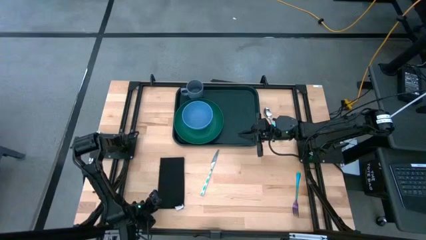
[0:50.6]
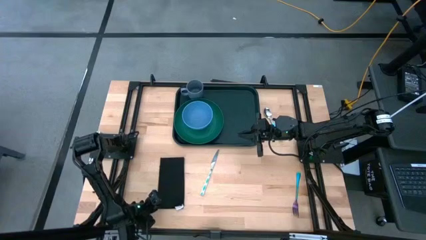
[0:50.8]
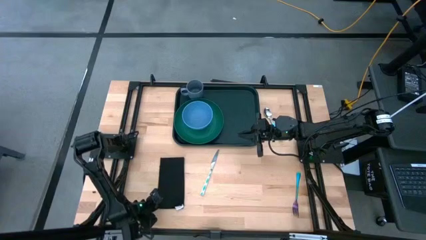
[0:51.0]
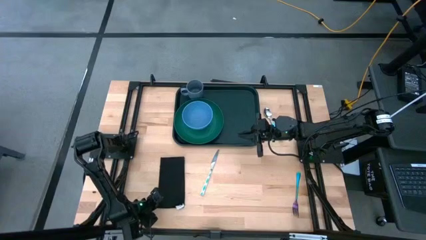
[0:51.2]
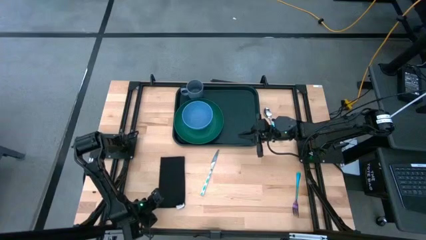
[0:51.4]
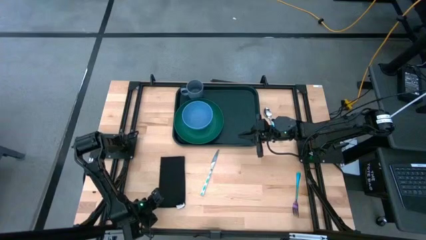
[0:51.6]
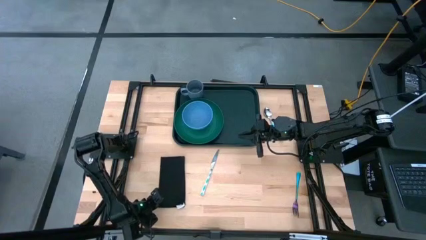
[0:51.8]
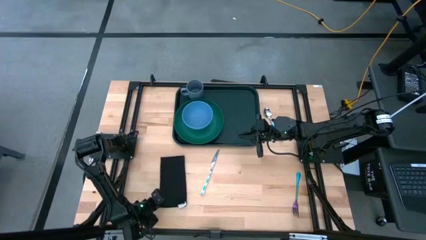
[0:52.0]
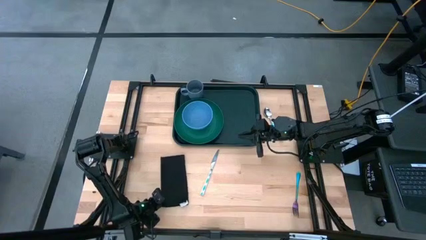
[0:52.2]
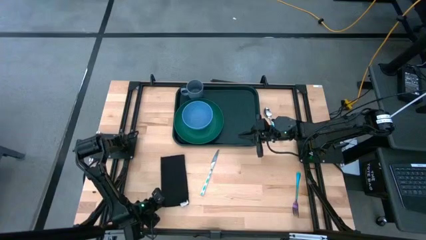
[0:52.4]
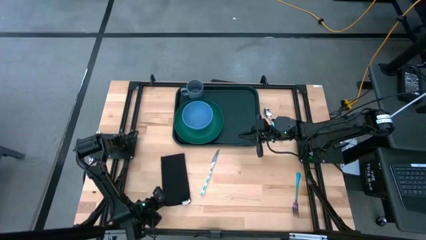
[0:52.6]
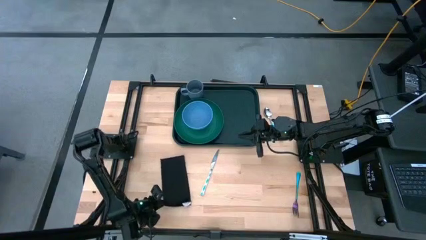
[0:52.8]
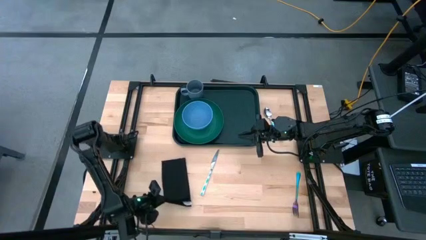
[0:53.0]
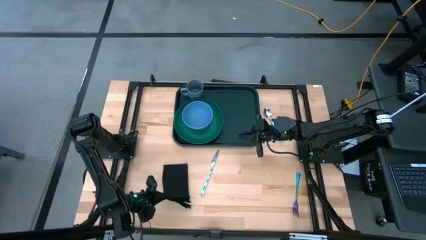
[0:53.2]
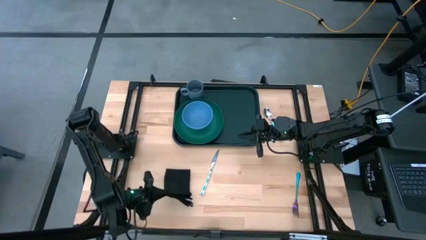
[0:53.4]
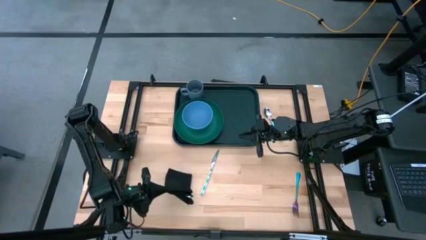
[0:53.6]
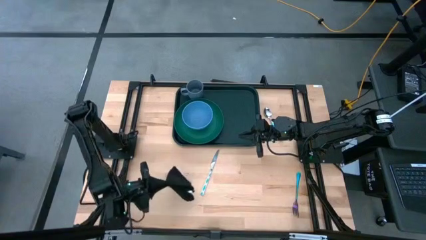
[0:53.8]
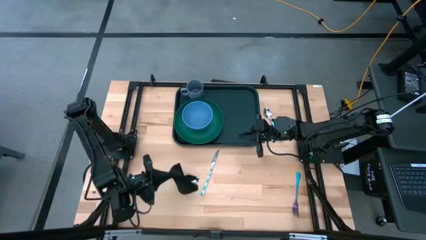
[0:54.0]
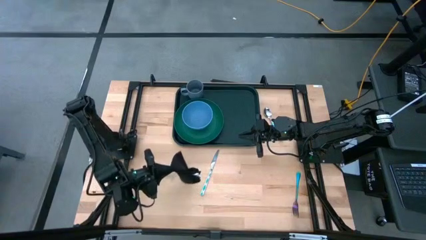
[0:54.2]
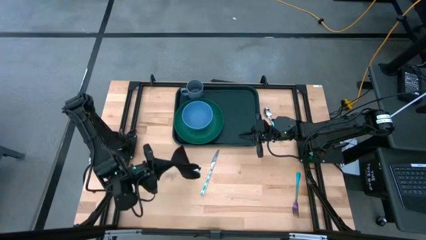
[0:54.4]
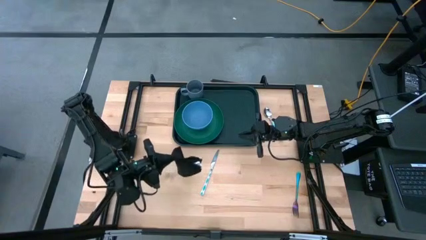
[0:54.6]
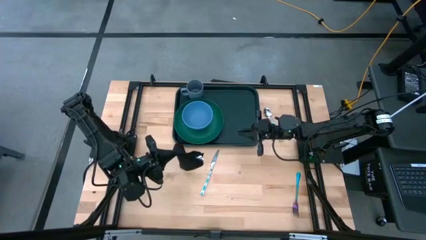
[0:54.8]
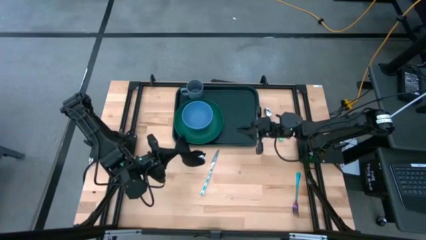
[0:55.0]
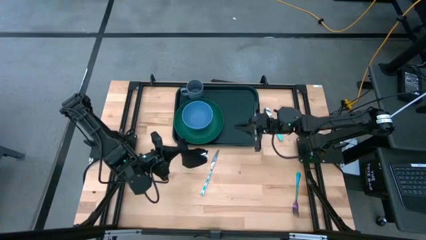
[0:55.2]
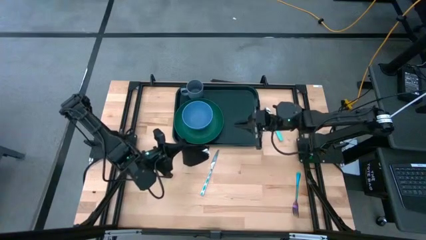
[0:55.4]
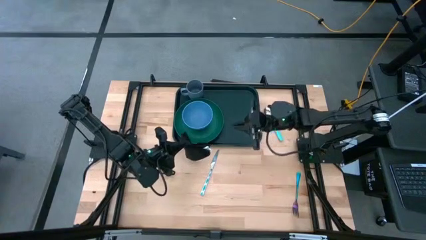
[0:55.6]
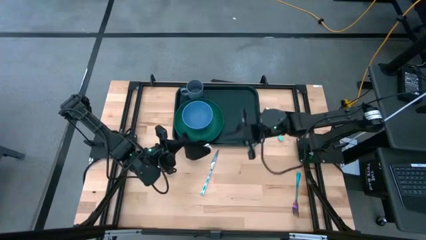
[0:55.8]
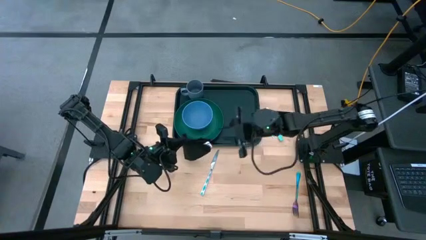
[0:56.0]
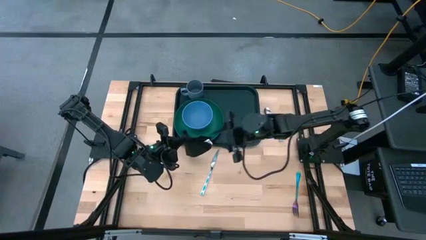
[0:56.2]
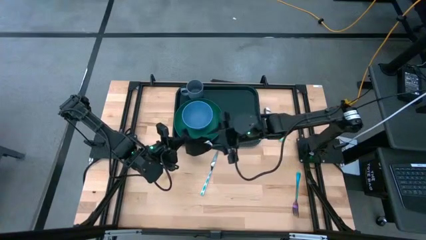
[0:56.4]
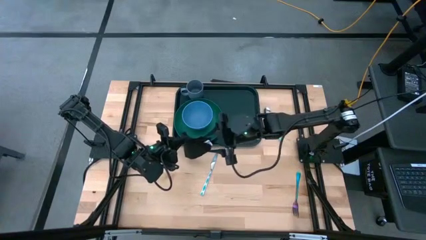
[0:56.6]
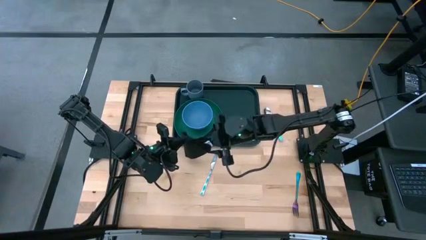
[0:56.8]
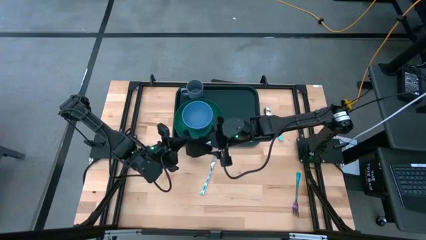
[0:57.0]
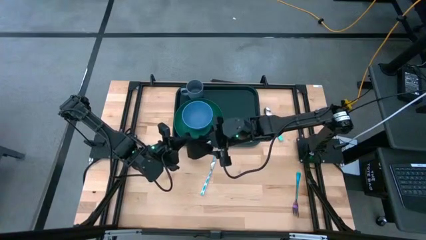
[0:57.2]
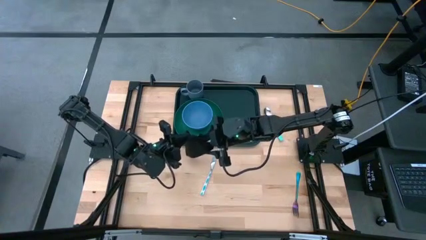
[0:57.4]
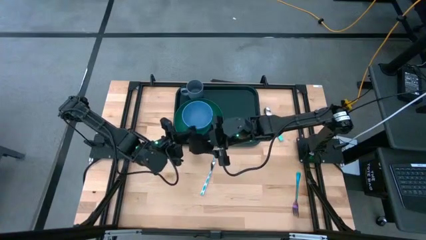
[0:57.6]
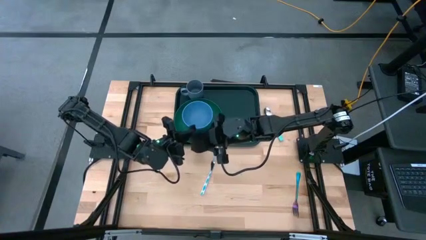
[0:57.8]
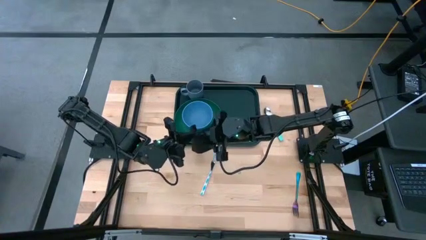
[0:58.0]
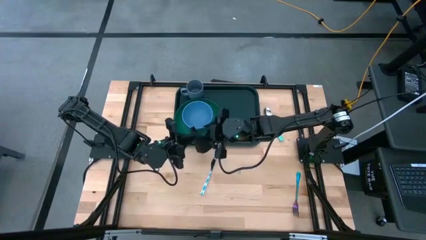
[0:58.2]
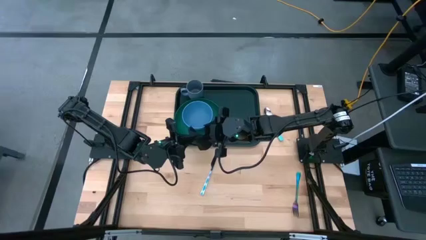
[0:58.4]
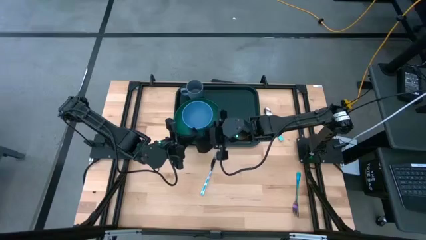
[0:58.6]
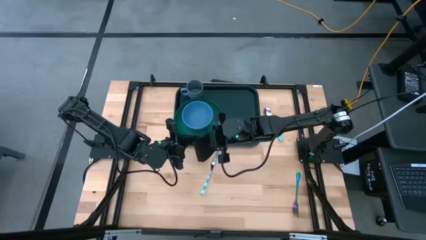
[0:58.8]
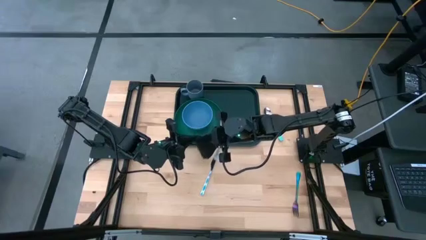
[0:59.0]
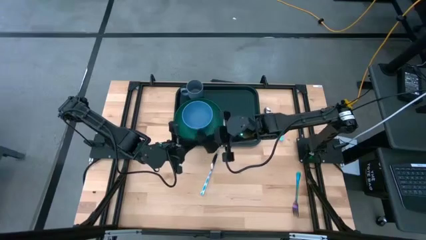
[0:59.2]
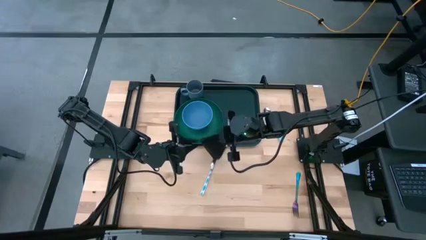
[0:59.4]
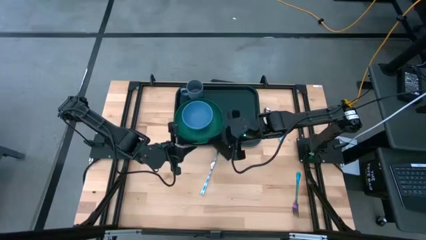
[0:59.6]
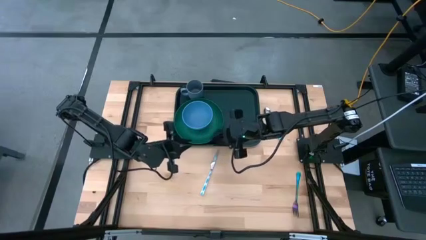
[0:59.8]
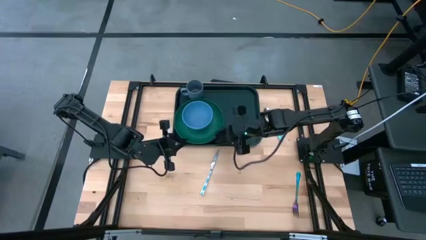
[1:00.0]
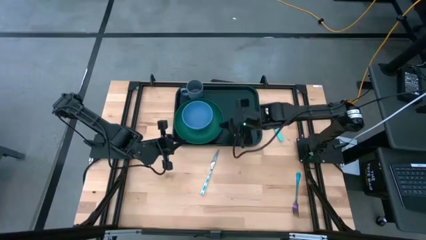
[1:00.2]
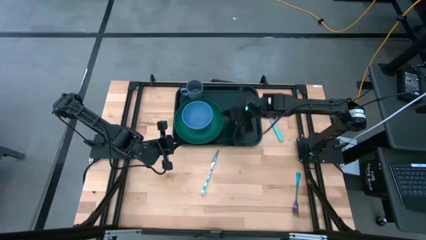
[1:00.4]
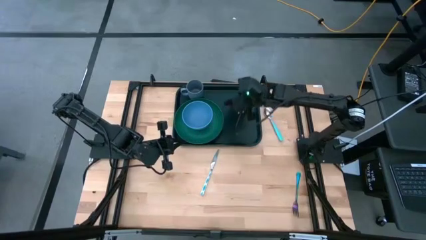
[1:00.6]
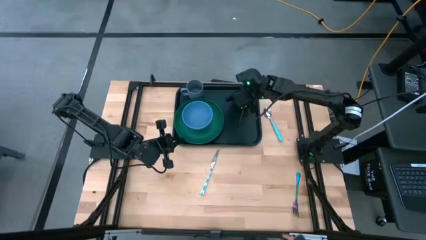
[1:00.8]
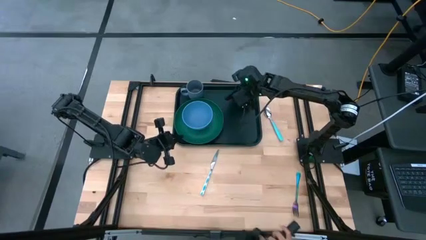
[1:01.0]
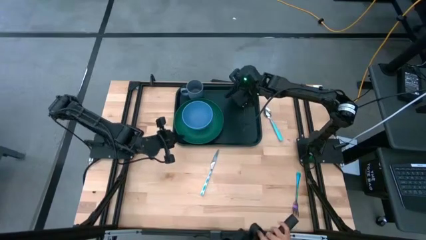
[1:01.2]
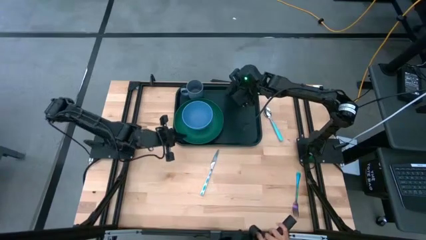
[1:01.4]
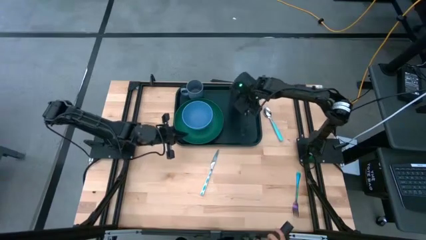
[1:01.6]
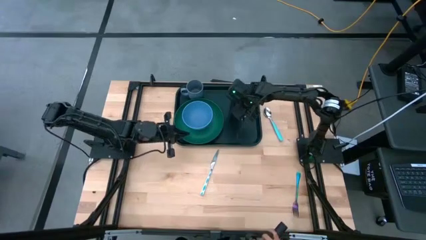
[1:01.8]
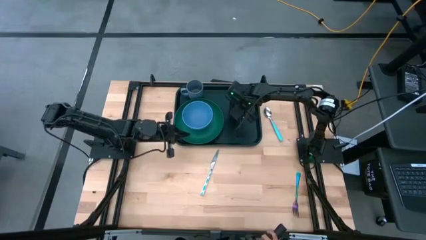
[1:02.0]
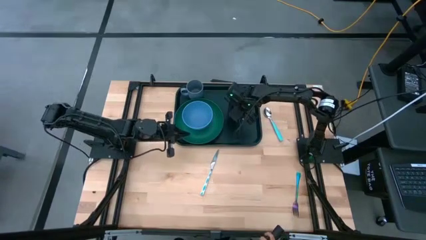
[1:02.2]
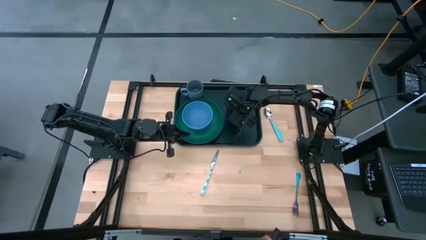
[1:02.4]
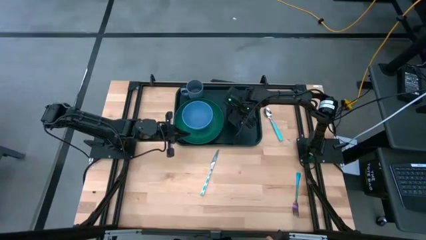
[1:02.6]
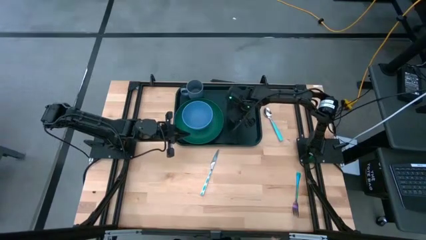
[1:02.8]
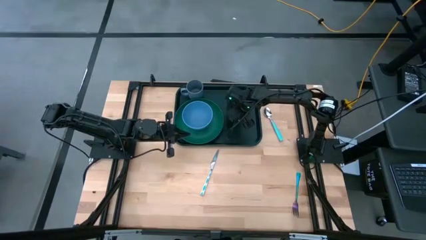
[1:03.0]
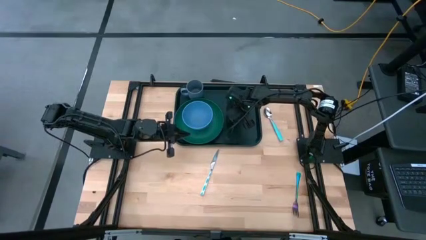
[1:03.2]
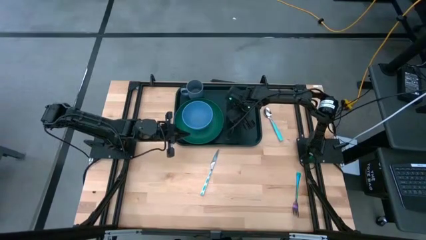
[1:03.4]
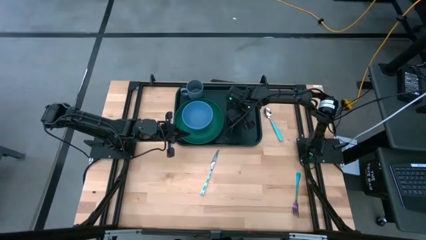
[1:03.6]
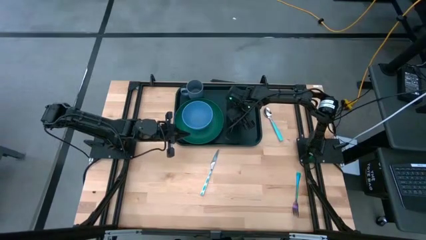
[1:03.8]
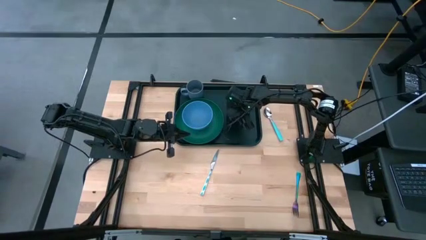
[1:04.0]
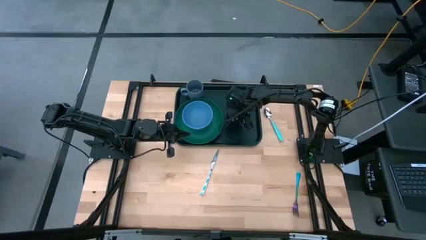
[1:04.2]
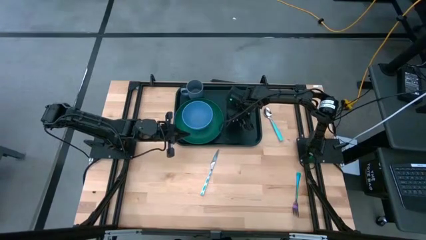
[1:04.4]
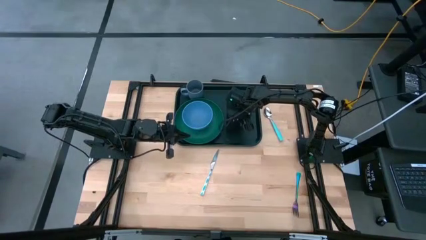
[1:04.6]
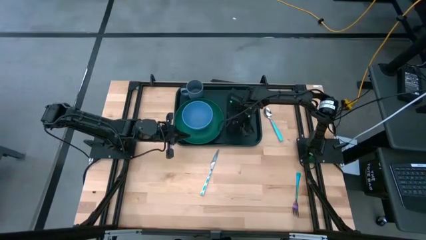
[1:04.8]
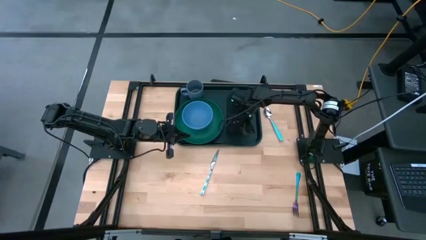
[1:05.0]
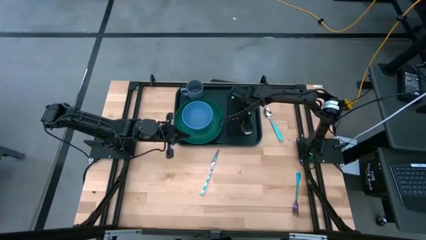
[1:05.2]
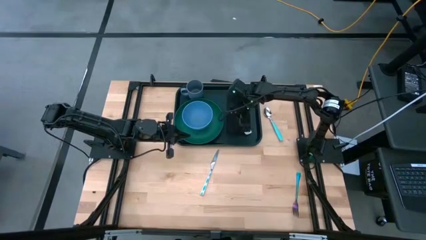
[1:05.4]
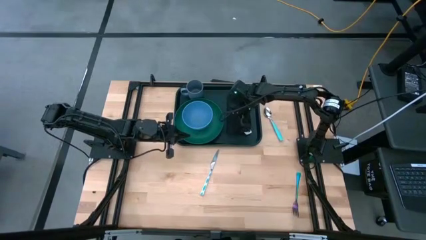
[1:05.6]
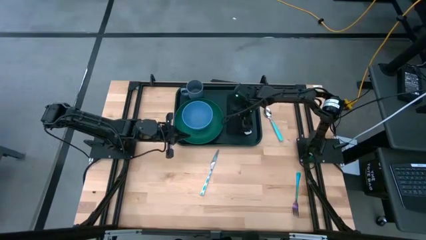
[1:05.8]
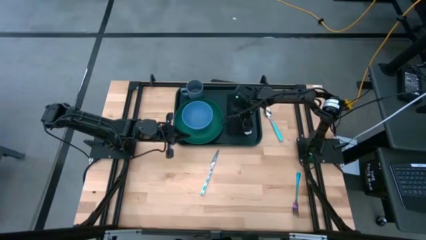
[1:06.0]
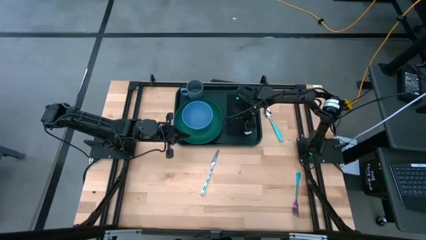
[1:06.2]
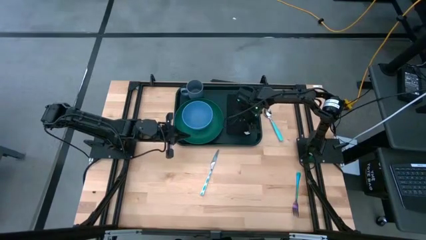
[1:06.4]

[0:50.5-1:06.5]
Task: Set up tray
Put the black napkin on the green tray
